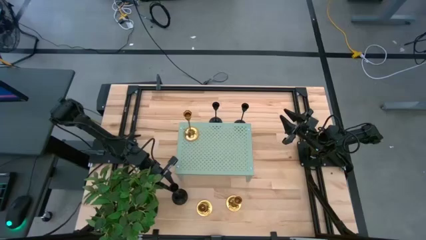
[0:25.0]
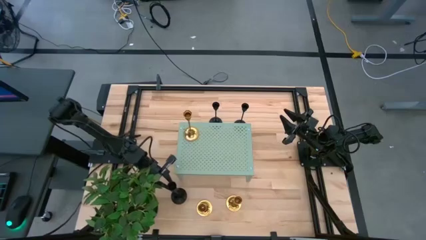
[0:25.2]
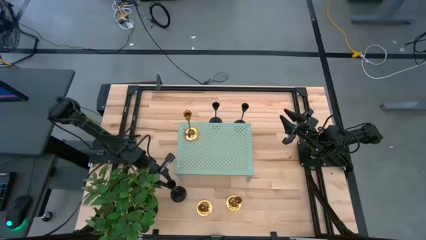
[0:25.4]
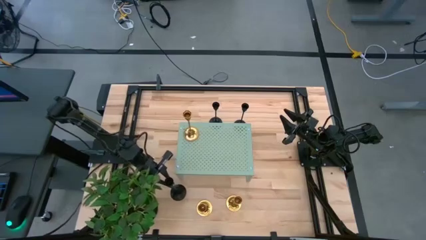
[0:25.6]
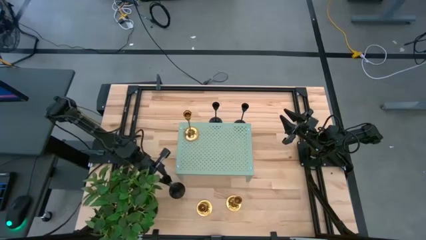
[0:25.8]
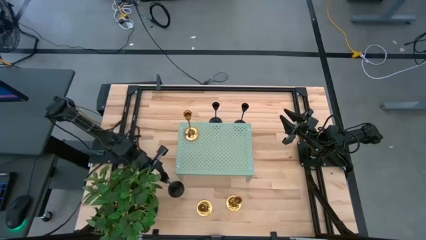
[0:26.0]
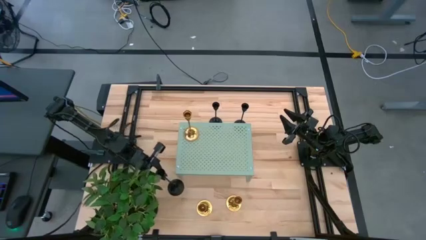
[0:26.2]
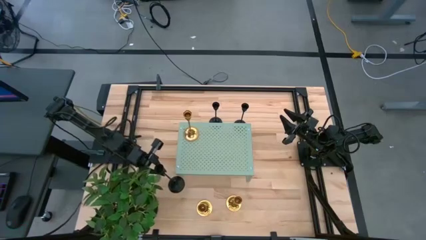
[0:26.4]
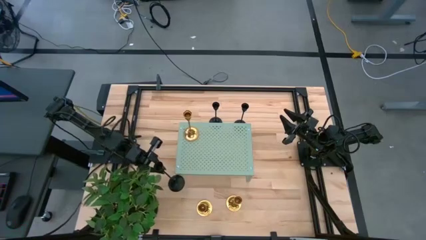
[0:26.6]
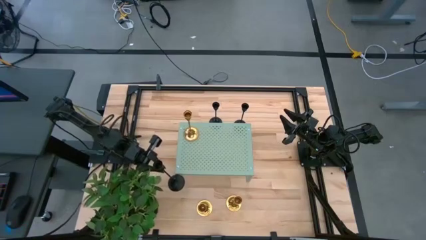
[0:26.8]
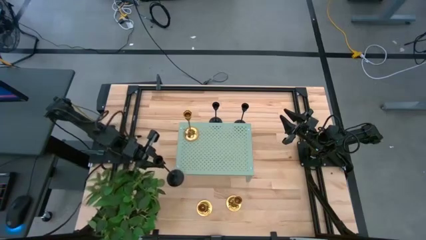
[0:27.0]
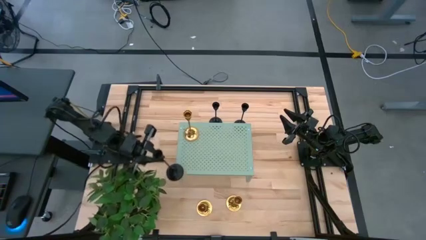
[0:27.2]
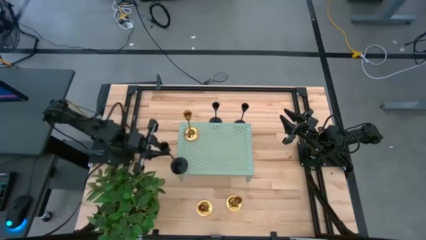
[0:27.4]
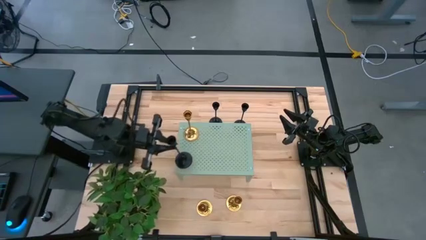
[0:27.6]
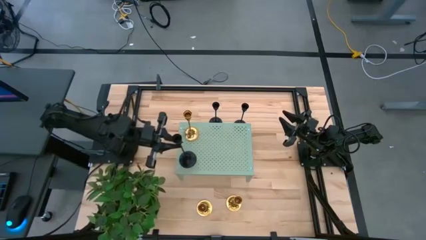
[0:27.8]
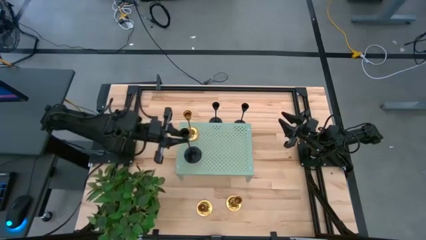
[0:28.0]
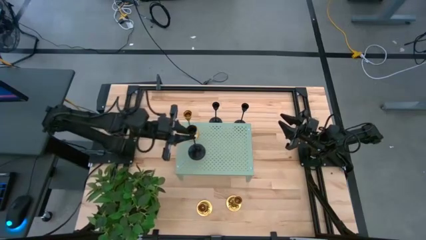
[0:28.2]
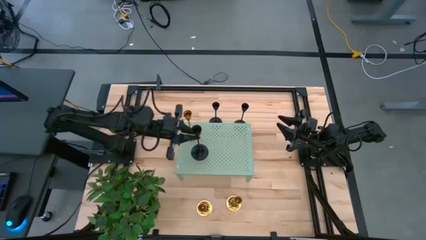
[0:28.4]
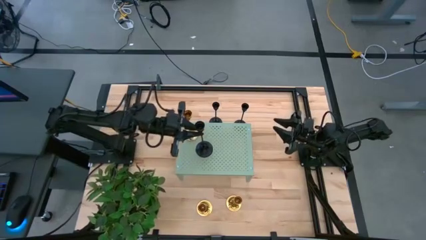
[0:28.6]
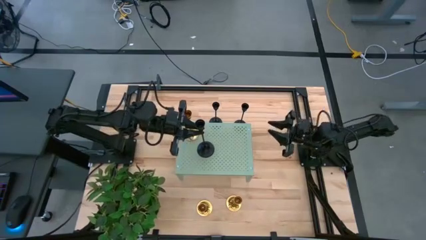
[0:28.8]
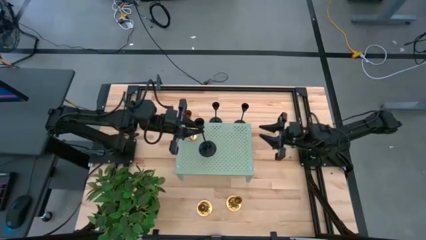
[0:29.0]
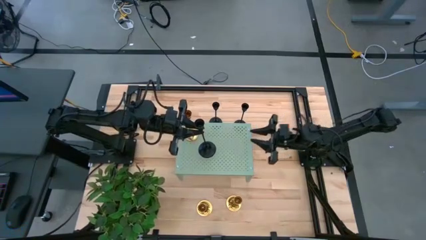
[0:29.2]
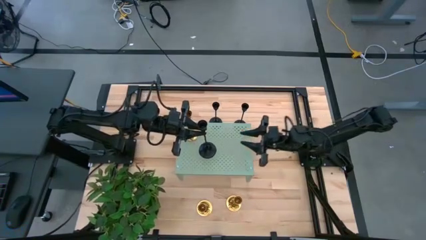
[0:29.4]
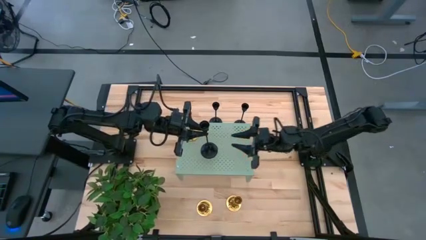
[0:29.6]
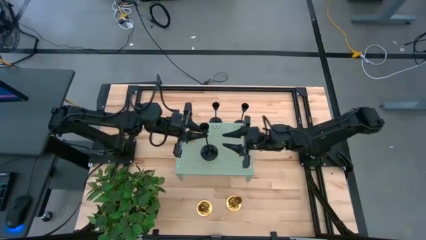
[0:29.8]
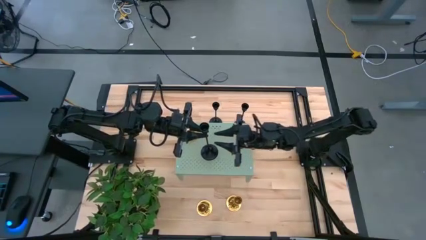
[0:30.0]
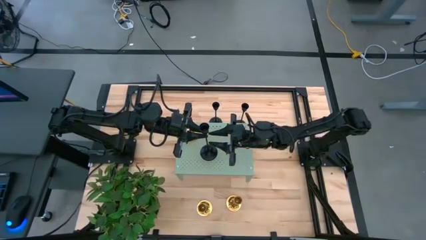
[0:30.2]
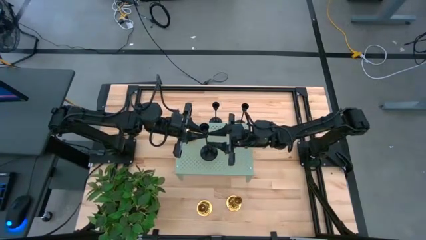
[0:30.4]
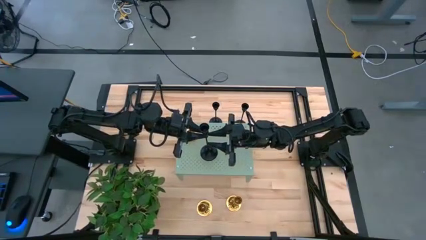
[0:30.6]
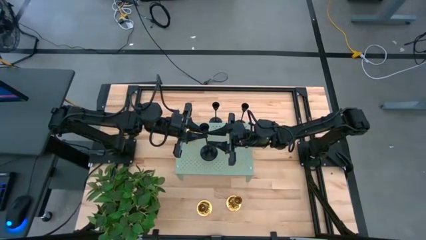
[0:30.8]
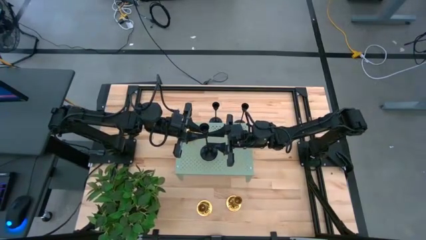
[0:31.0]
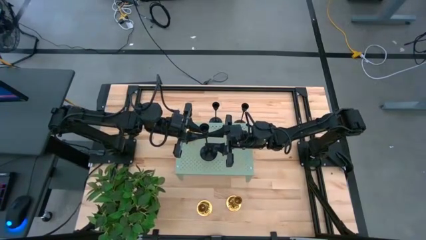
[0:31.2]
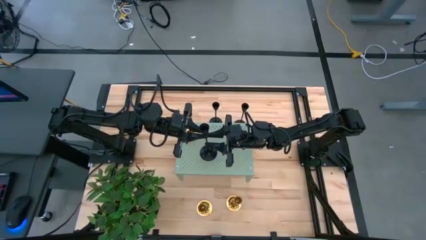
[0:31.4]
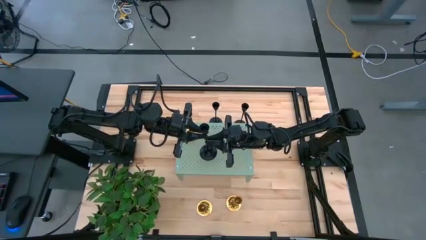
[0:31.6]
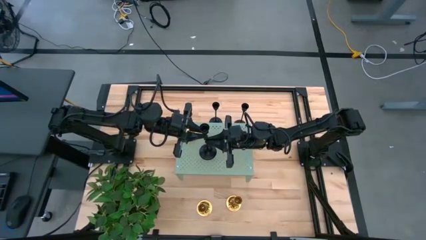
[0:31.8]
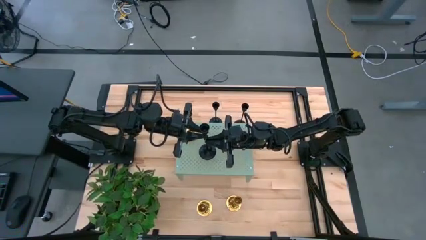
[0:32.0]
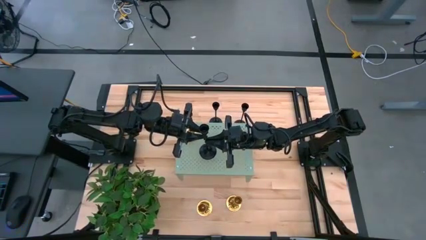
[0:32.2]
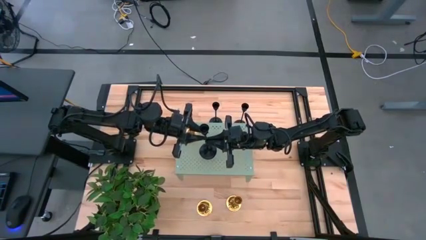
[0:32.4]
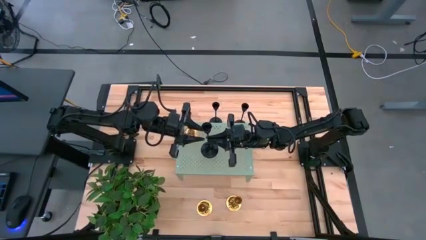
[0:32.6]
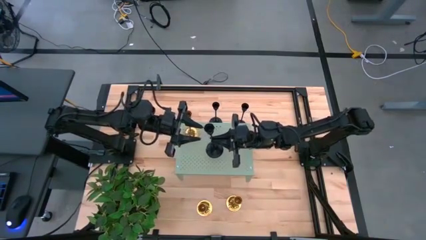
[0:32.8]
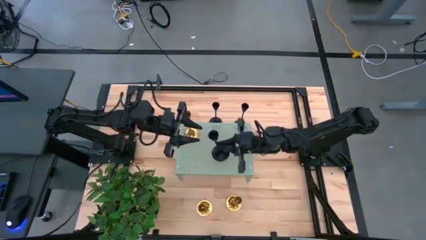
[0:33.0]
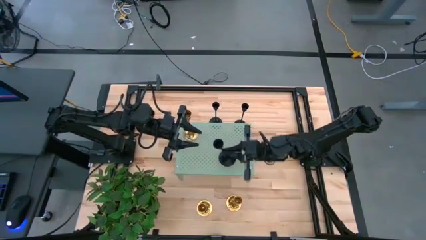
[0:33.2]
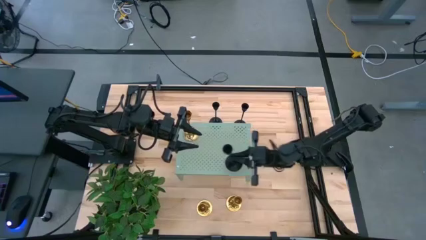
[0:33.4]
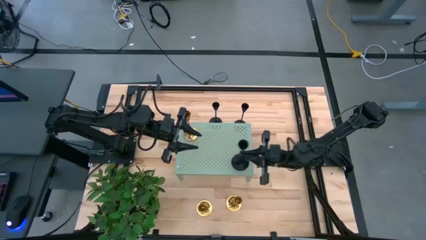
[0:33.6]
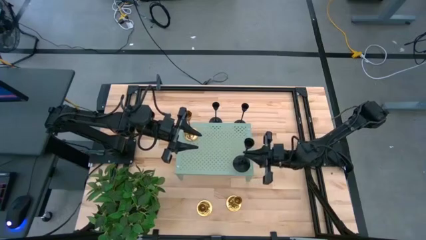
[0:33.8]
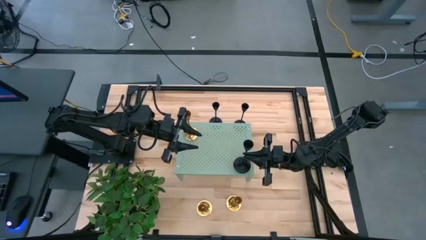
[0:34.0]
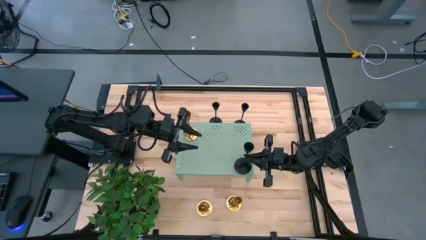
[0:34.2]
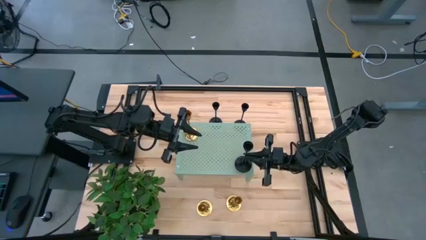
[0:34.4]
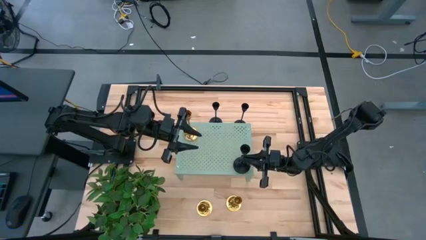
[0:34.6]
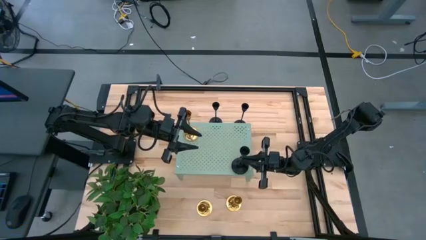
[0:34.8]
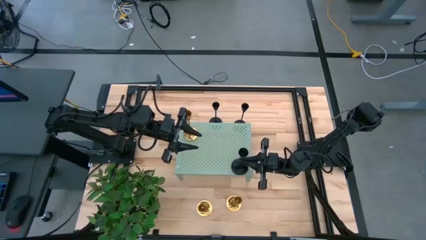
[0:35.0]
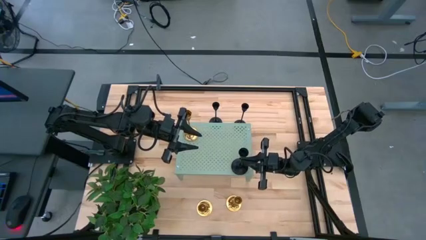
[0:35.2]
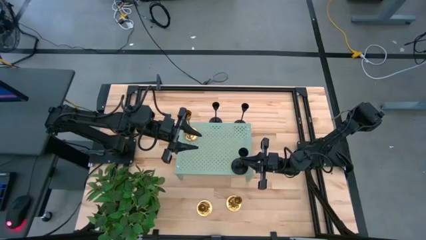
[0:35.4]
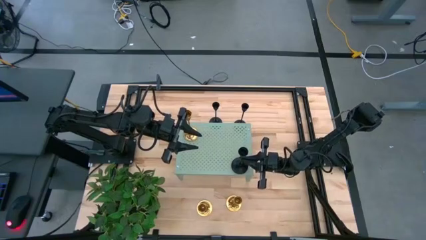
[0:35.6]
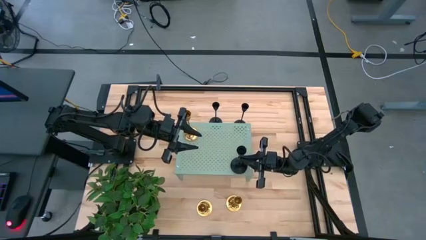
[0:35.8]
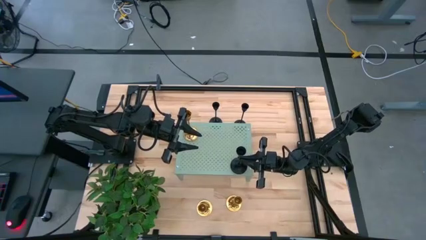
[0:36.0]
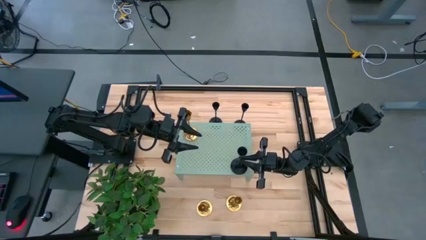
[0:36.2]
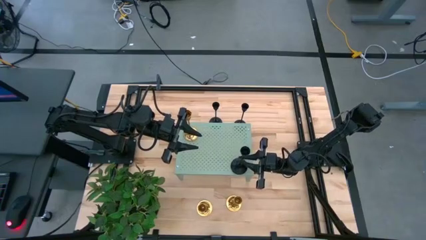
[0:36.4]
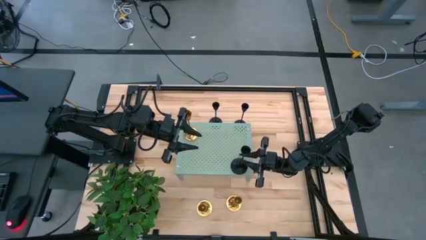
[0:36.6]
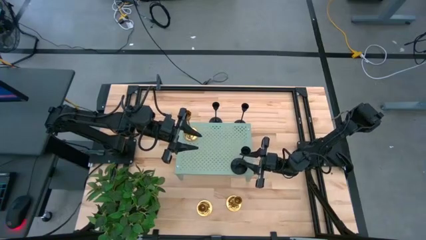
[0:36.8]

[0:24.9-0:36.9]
Task: Pick & Place candle stick holders
Put the bottom left black candle holder on the shelf
